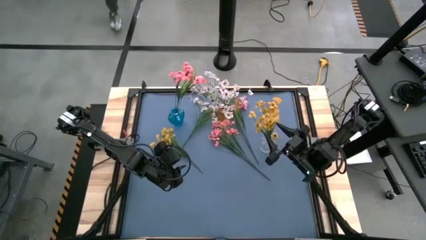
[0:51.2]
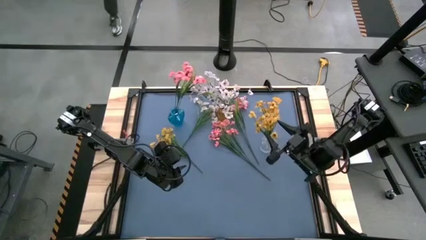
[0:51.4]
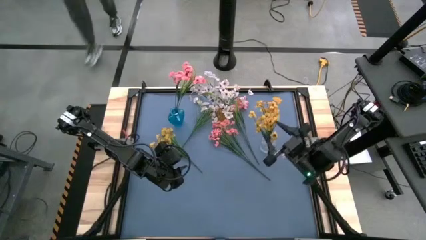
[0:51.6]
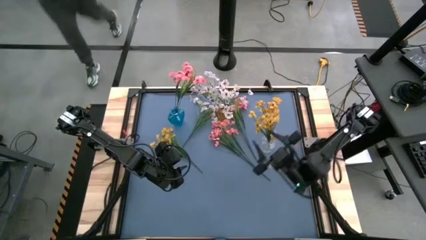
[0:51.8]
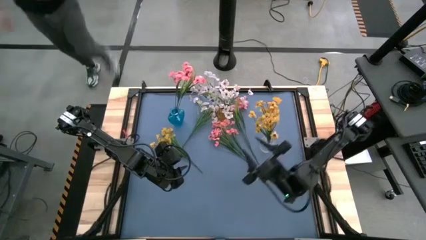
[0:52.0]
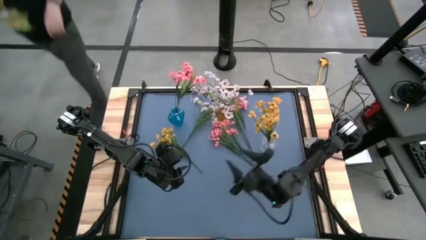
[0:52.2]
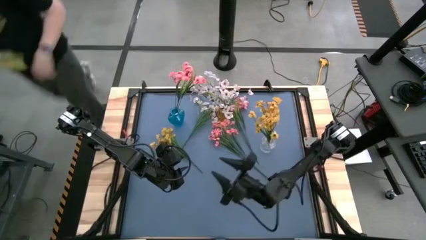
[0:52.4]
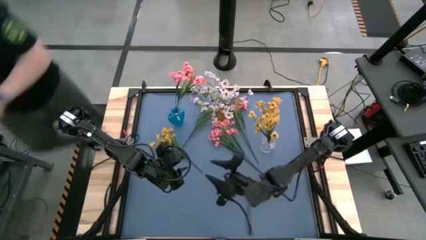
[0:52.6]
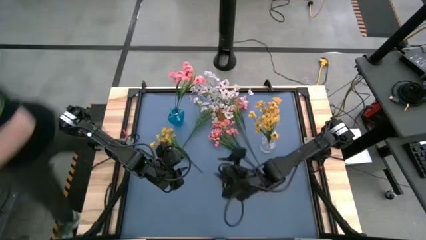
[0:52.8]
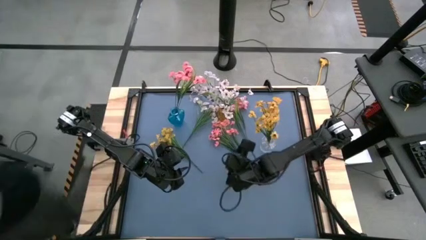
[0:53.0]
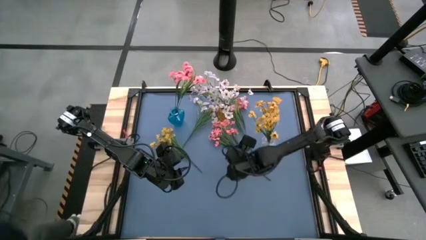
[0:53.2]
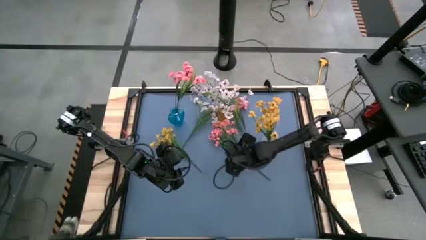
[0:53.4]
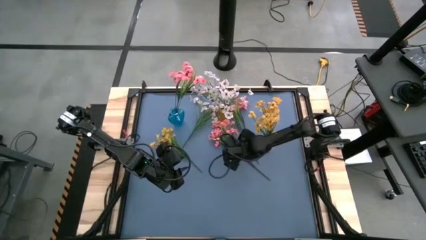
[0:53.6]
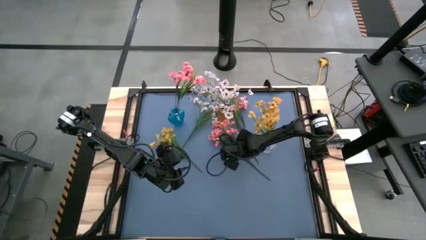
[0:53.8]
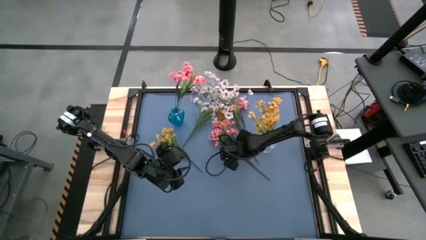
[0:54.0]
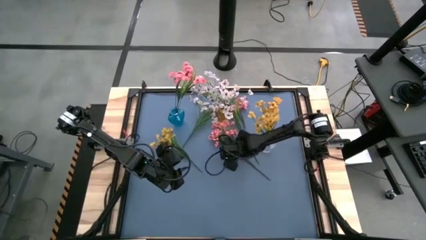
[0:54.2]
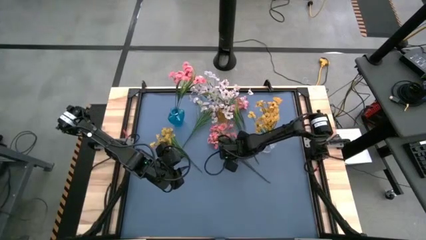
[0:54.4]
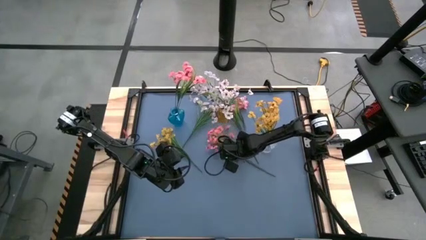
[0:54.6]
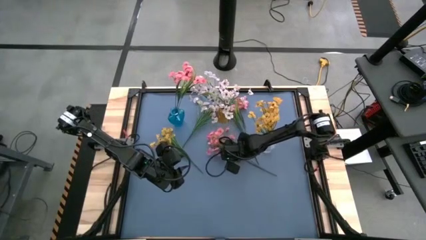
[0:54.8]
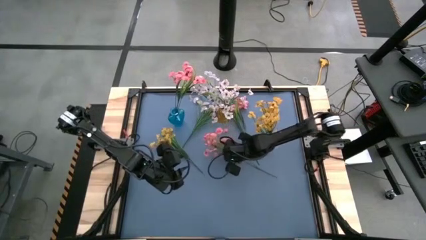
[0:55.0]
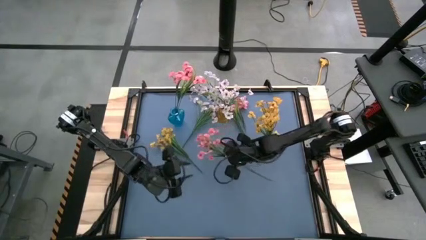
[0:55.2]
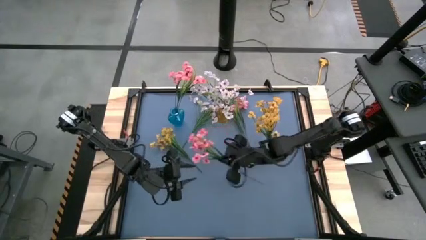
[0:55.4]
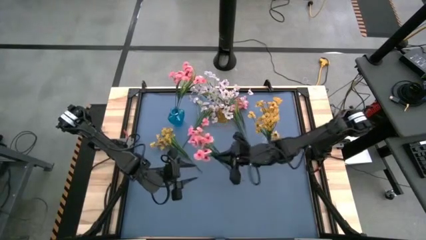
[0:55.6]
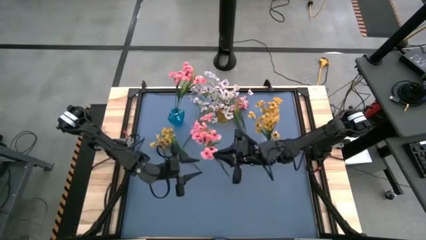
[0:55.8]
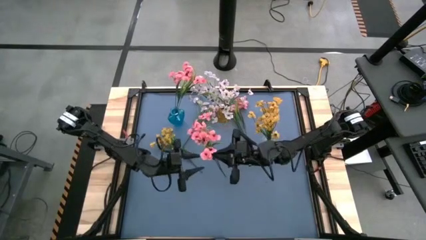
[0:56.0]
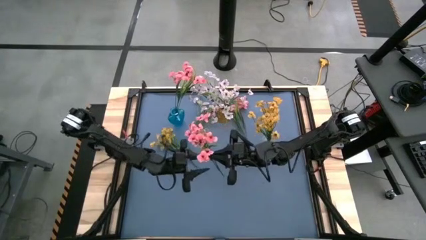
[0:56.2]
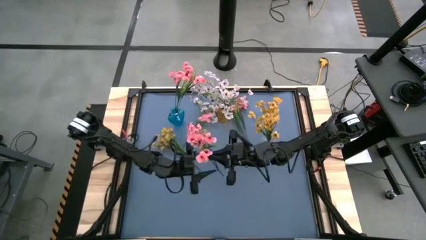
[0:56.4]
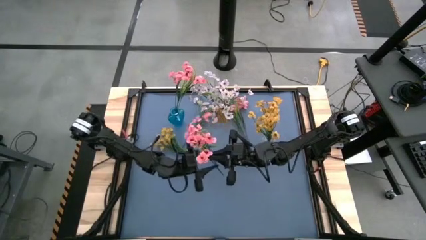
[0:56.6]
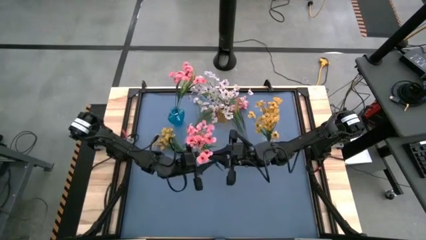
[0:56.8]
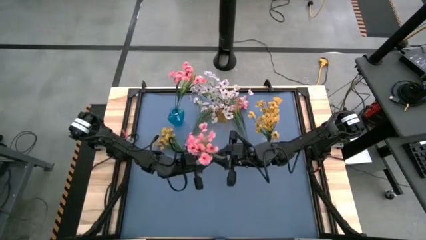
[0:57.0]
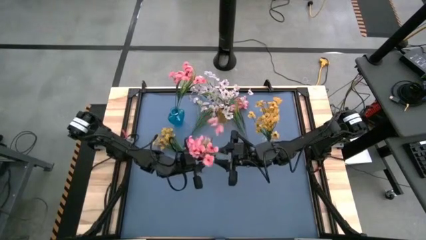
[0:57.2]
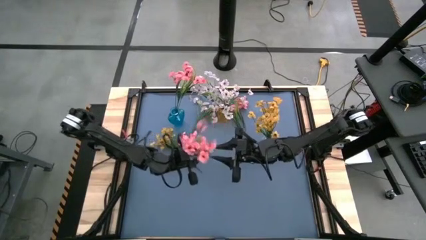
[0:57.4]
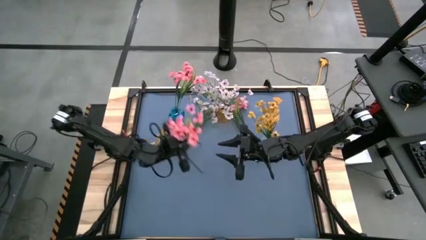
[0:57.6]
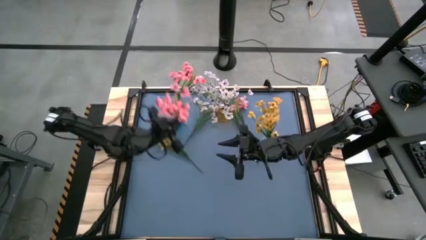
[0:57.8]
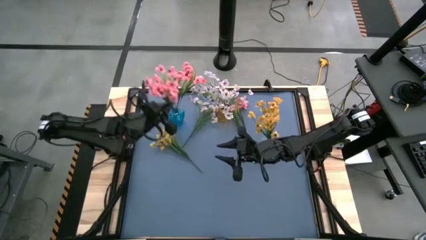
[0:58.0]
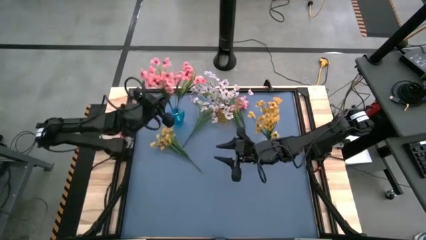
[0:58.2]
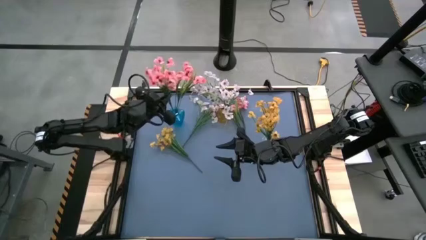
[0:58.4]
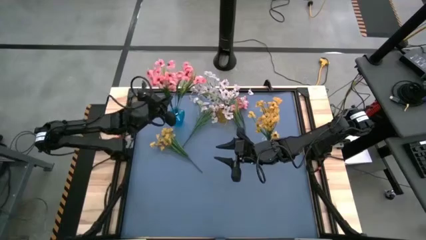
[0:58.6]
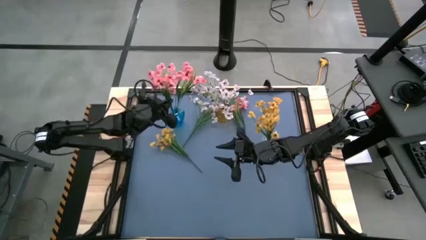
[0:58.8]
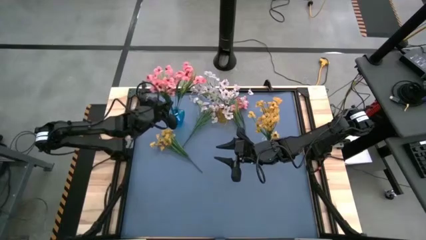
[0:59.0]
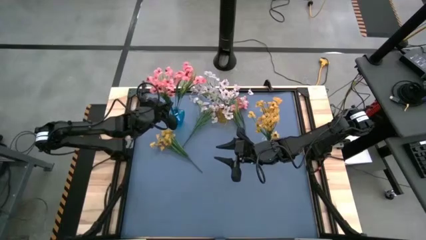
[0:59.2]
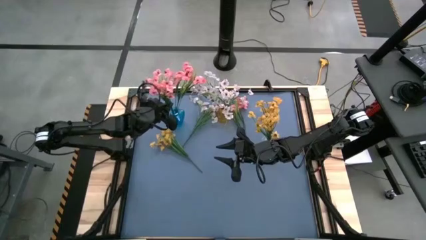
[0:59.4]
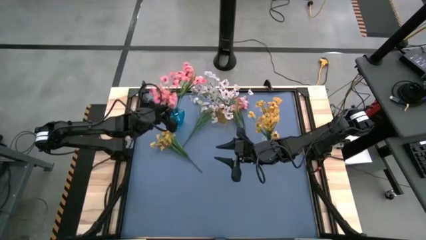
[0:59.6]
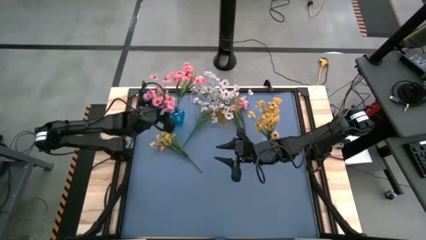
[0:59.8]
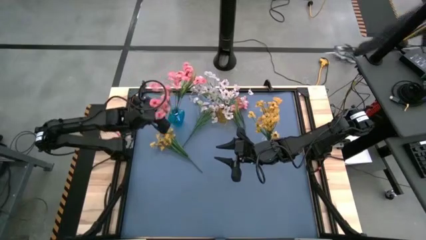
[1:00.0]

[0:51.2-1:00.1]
Task: Sort flowers into vase by color
Put the bottom pink flowers into the blue vase

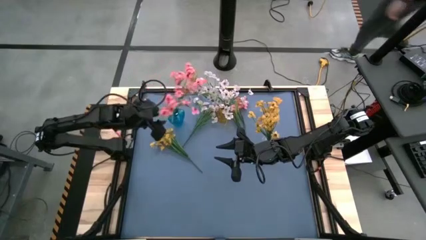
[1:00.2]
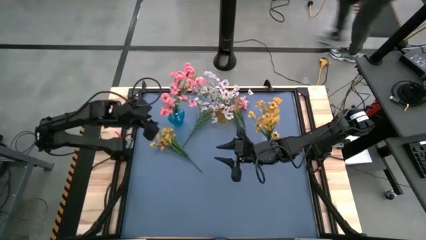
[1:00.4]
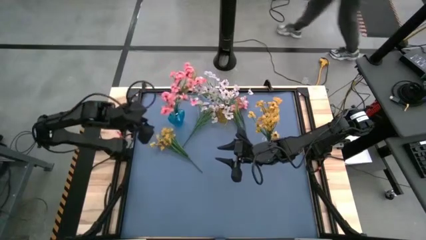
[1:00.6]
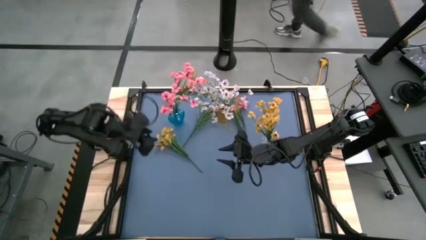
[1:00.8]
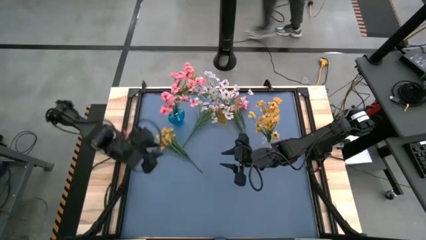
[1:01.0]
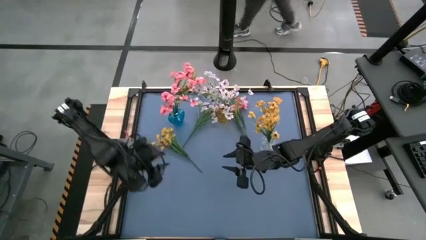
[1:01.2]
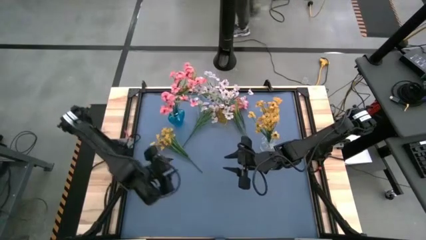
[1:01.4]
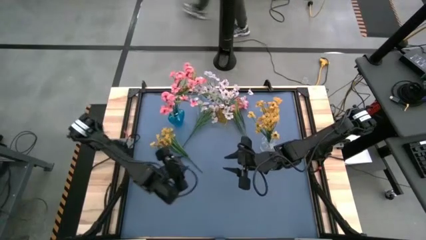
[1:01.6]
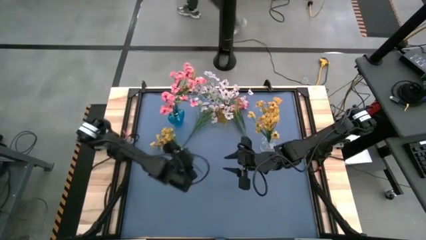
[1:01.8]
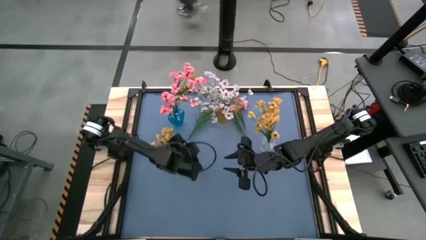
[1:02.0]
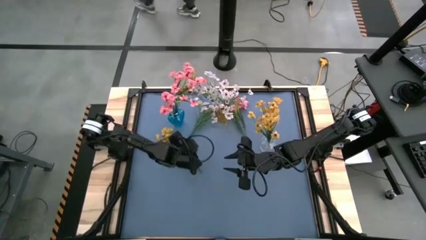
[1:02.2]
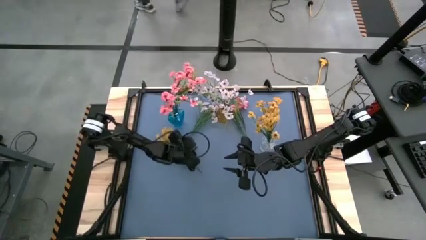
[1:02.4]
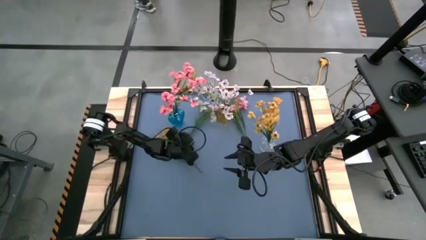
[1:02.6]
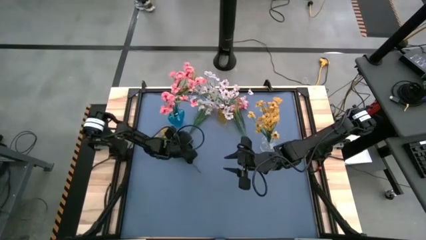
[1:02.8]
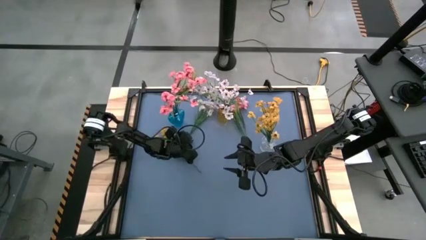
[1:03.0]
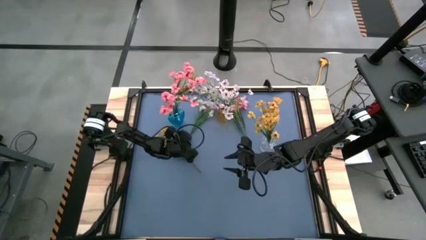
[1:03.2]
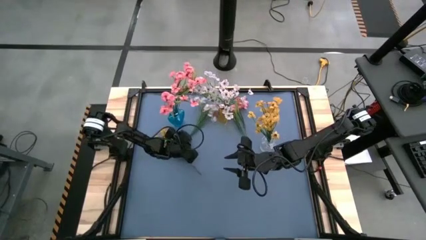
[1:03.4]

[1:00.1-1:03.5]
Put the white flowers into the yellow vase
